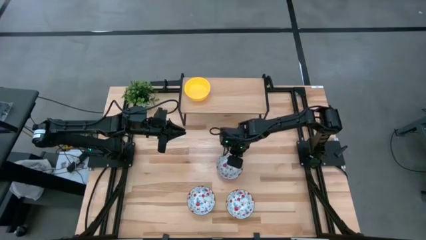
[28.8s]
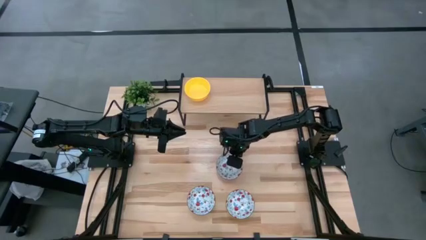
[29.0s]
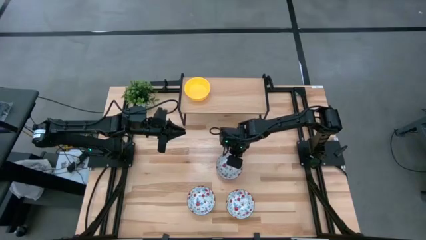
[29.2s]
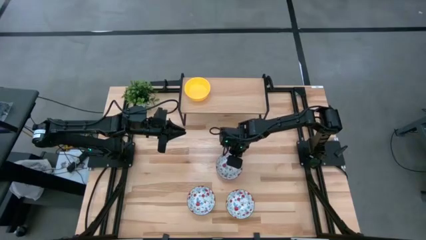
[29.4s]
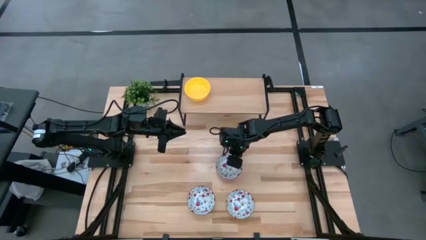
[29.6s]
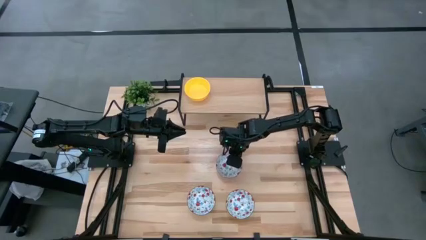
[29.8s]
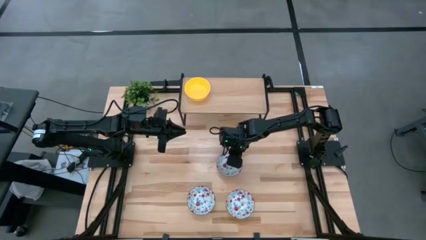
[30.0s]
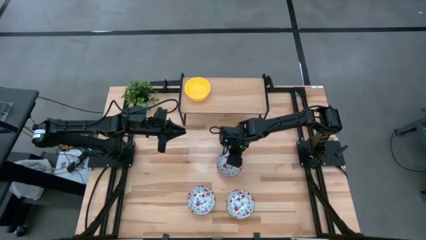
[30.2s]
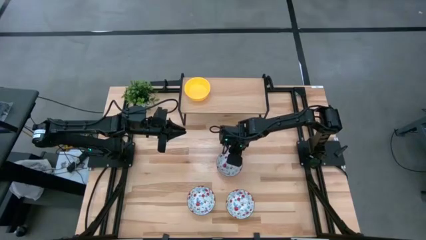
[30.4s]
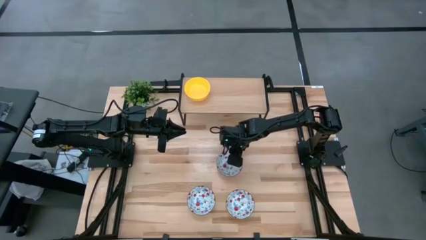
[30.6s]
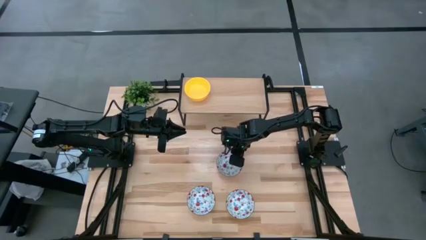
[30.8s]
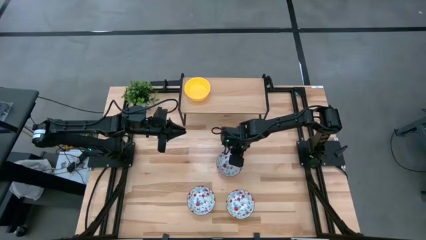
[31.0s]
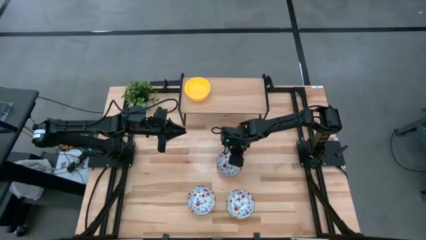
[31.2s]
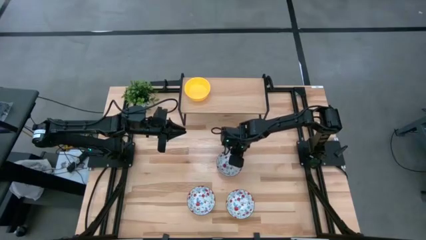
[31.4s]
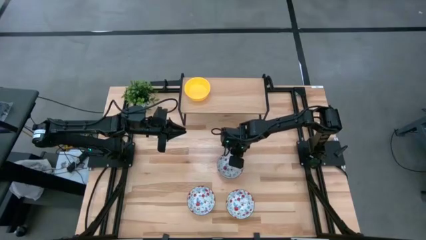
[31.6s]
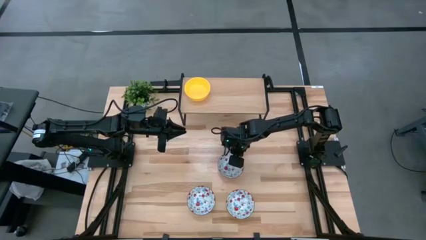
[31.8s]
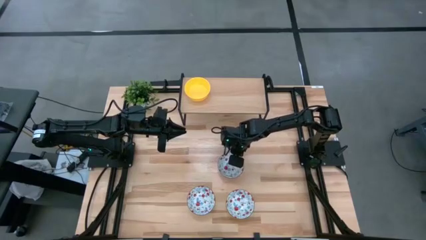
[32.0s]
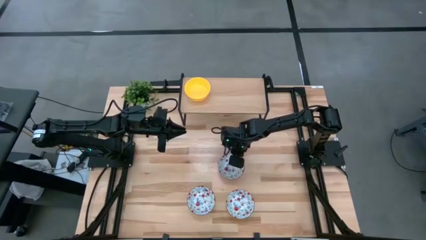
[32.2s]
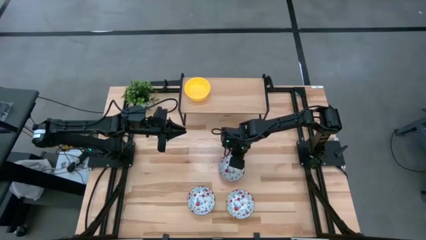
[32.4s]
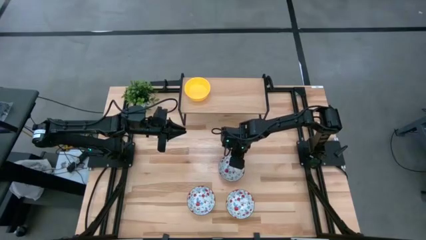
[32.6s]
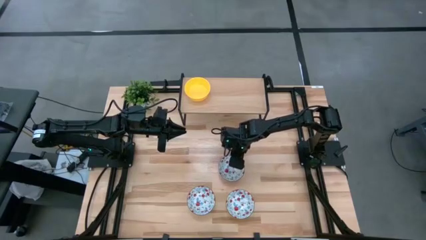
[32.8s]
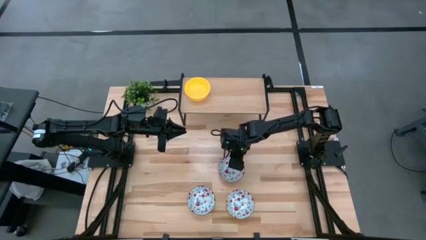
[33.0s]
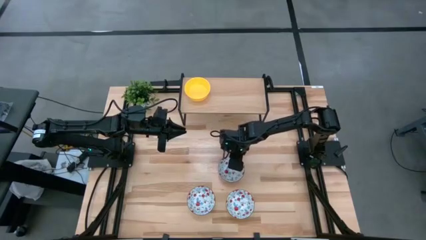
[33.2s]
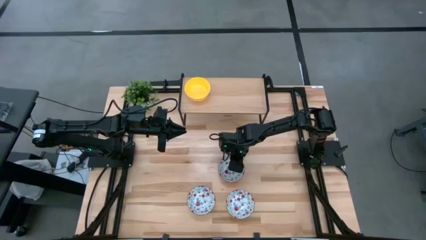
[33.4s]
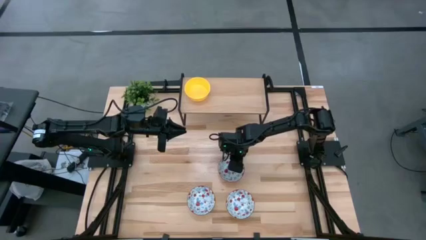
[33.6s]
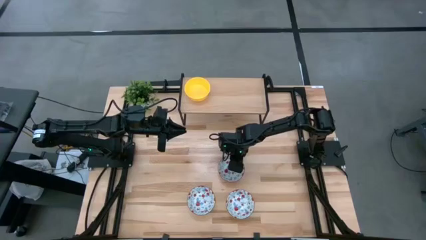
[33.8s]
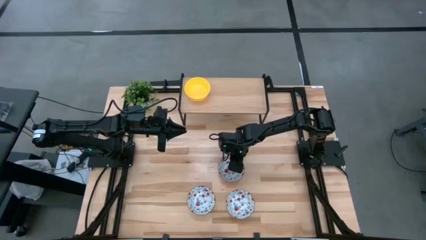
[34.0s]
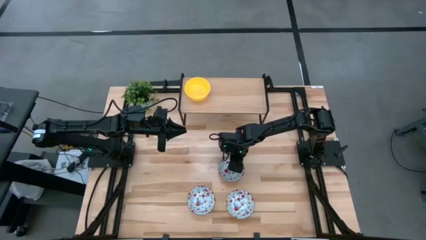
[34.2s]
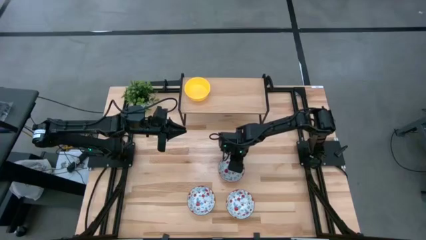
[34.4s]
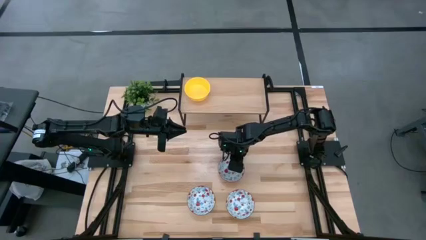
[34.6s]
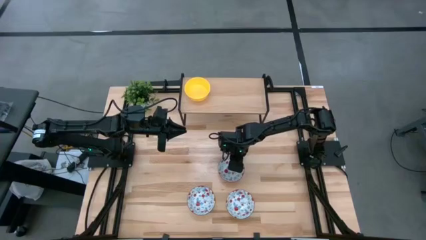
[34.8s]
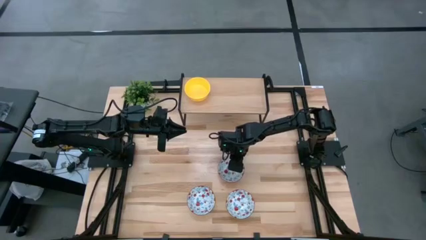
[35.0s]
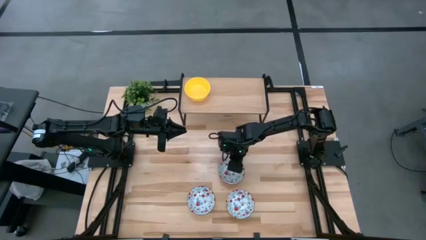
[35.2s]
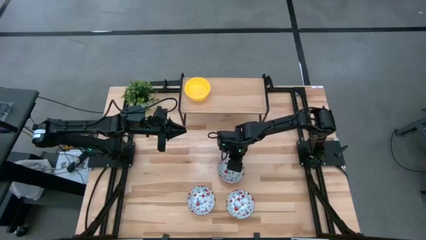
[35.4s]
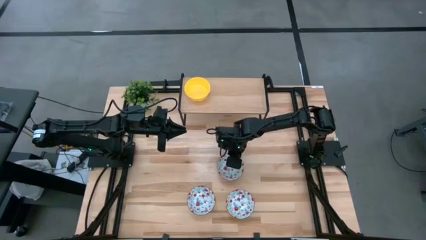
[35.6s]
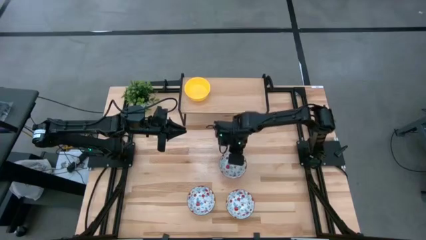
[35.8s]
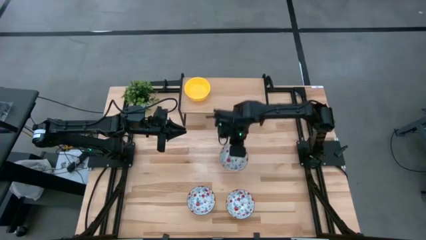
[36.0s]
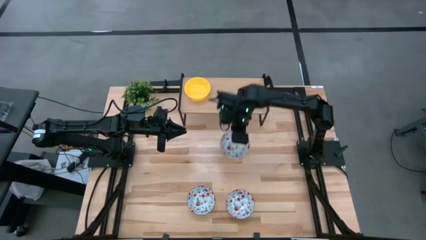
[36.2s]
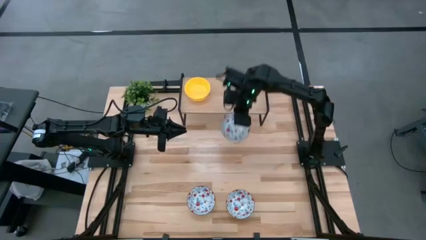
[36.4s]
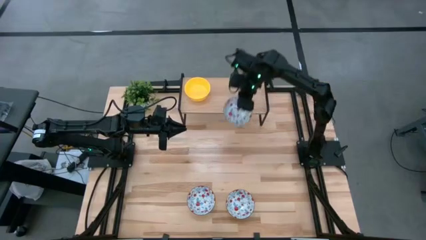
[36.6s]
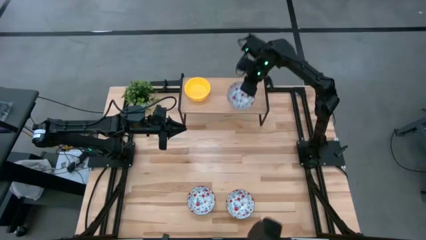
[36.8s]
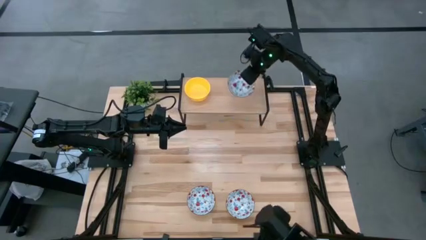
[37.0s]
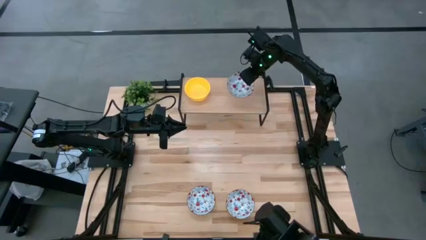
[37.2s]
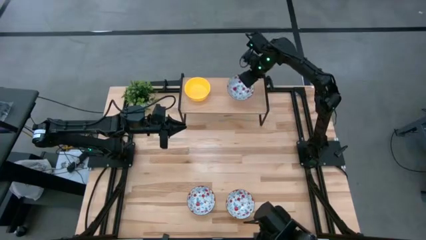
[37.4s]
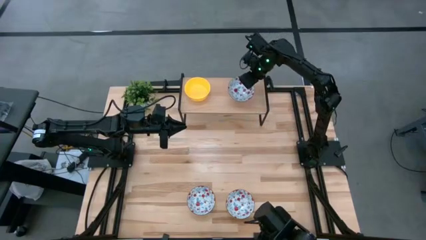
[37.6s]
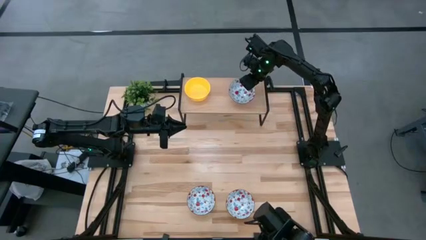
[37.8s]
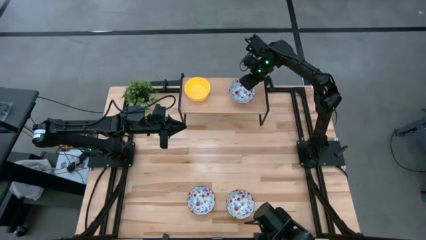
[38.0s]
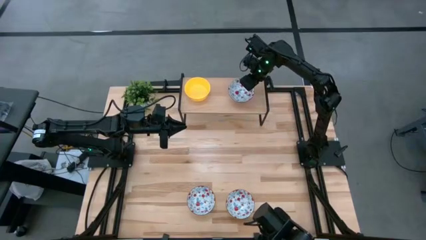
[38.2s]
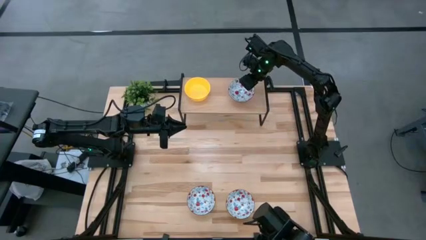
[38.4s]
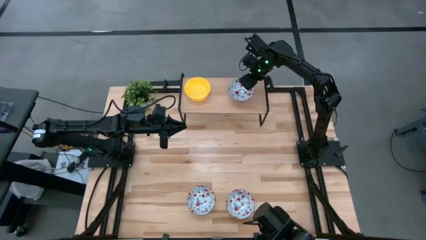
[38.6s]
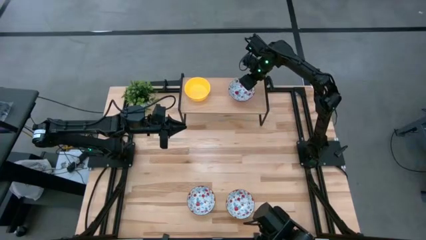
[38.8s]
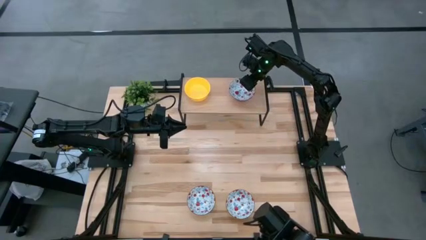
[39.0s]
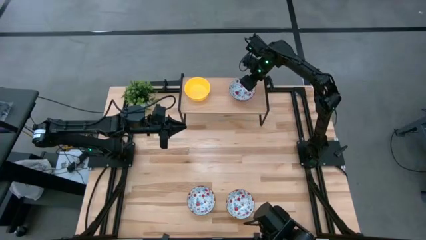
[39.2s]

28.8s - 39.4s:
Task: Pick & Place Mini bowls
Put the top white bowl on the shelf

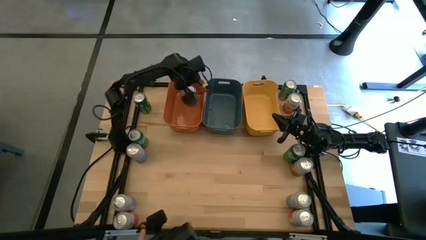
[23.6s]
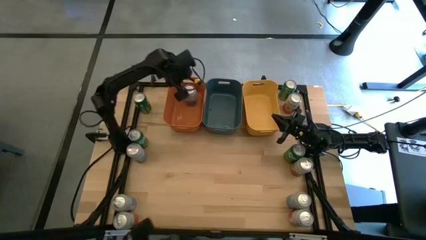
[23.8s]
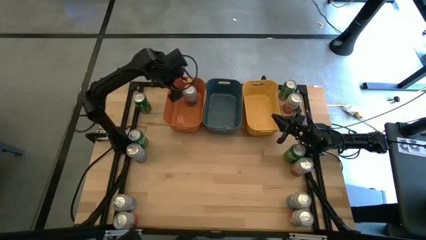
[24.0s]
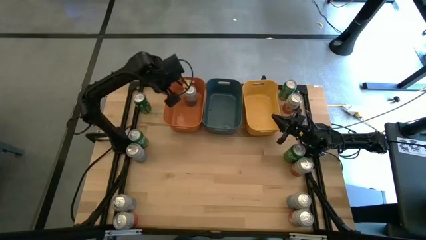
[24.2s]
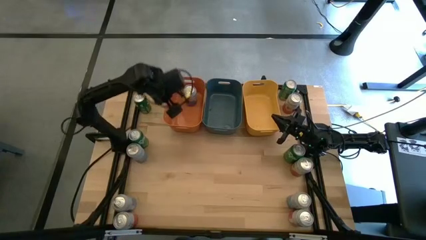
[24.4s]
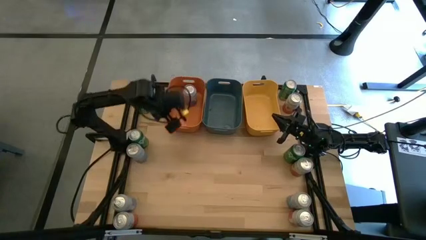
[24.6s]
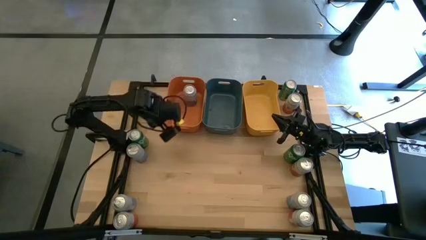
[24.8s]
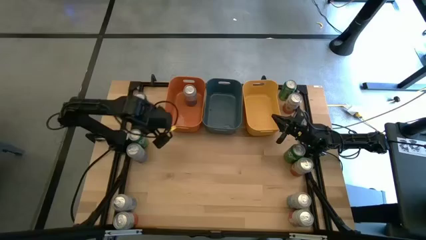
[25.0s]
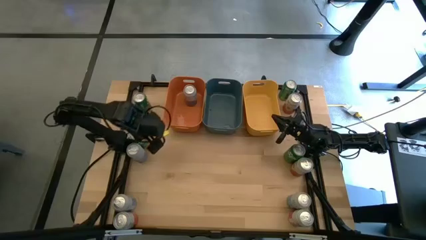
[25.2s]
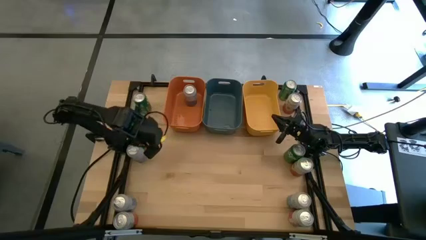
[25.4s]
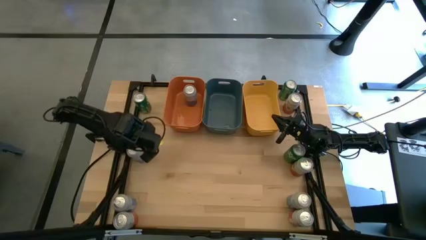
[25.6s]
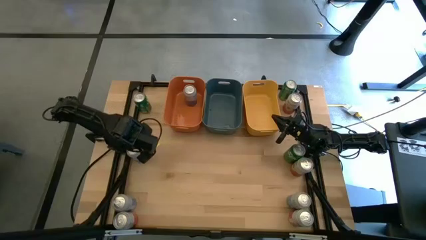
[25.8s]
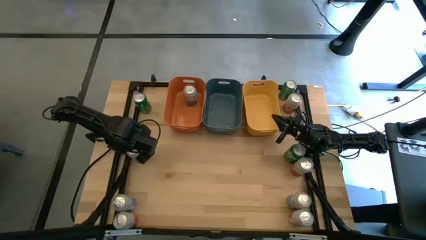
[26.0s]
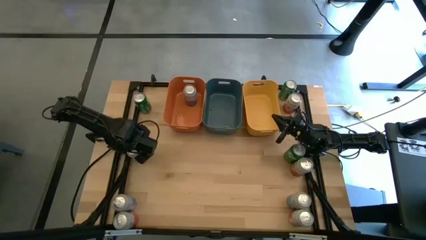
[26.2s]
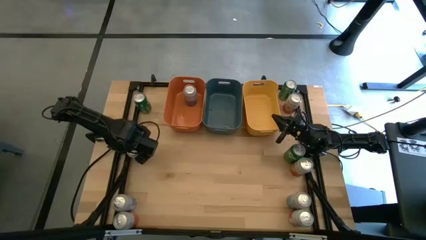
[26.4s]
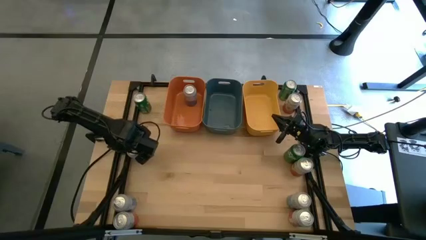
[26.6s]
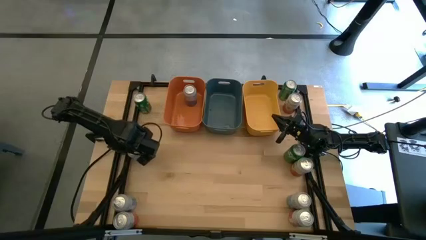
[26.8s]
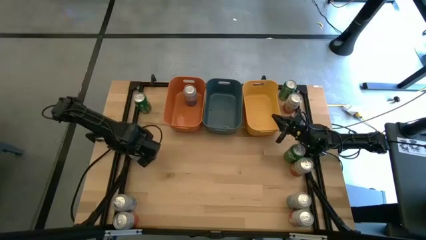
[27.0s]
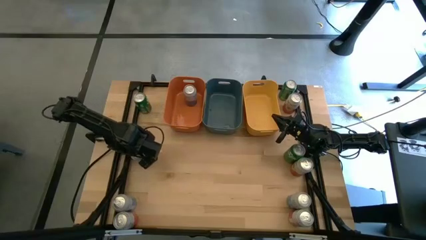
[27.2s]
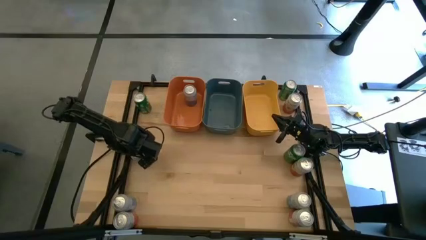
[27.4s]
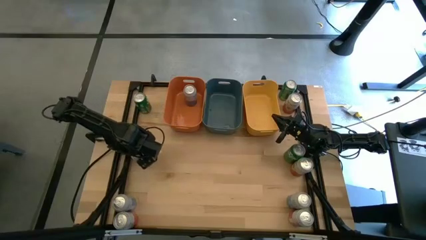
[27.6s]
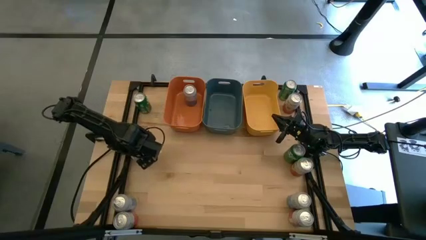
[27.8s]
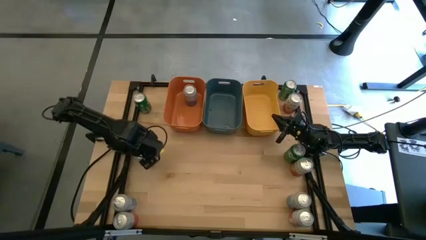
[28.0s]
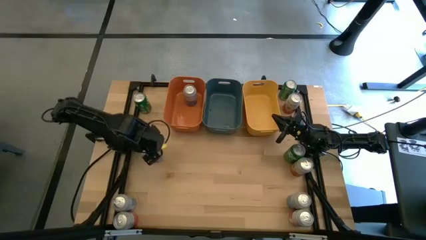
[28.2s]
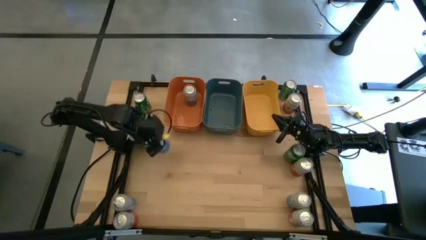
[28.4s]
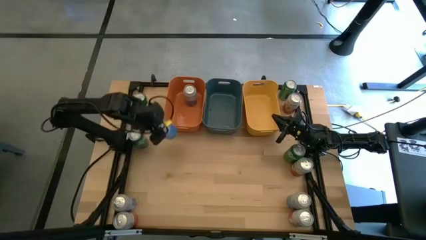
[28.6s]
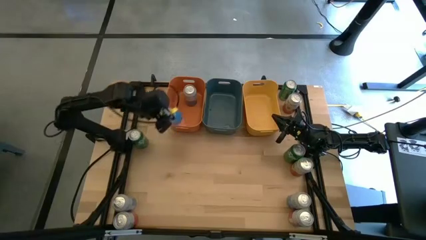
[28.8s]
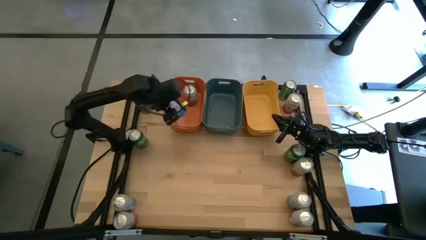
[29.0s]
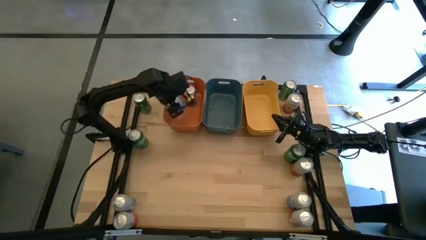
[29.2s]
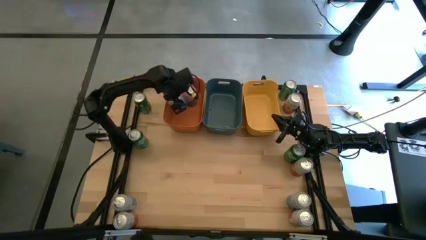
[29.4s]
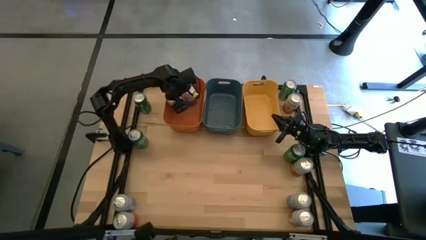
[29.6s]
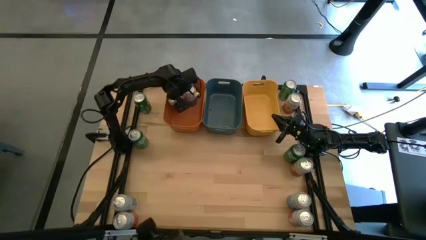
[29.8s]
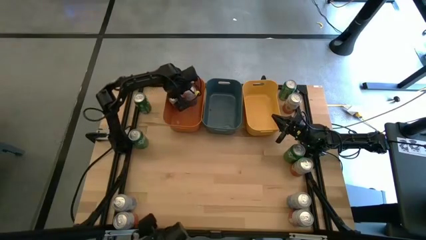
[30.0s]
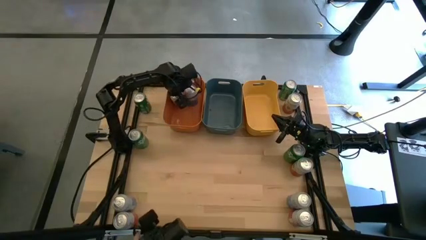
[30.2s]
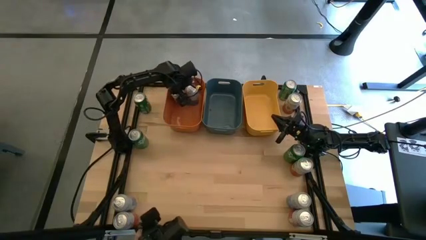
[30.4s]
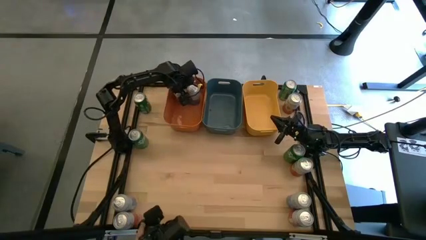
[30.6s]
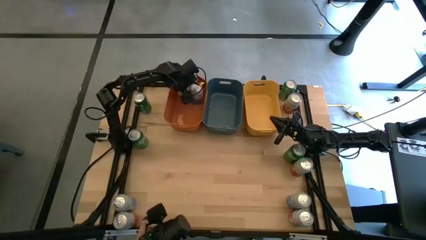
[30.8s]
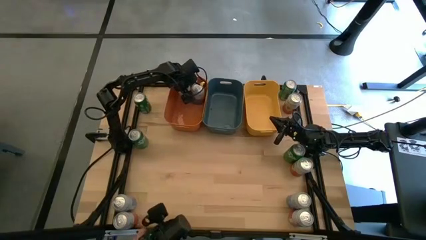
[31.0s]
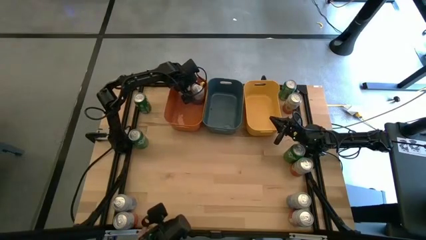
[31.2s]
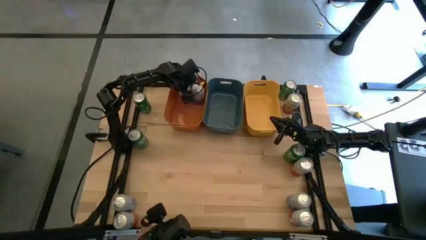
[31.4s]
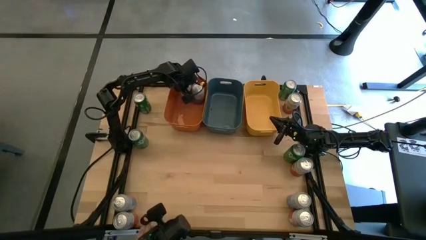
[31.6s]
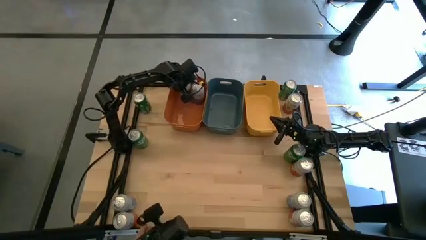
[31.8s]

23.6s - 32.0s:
Task: Sort soda cans
Put the top left blue-white soda can into the orange bin
